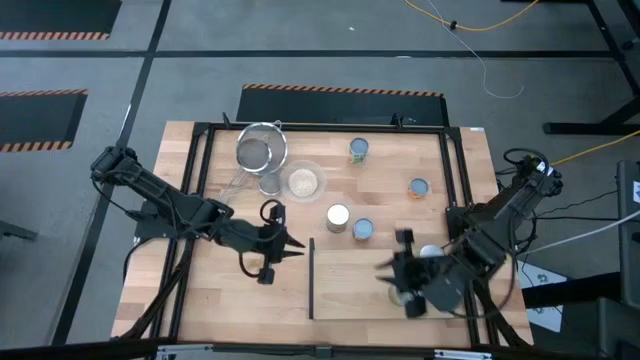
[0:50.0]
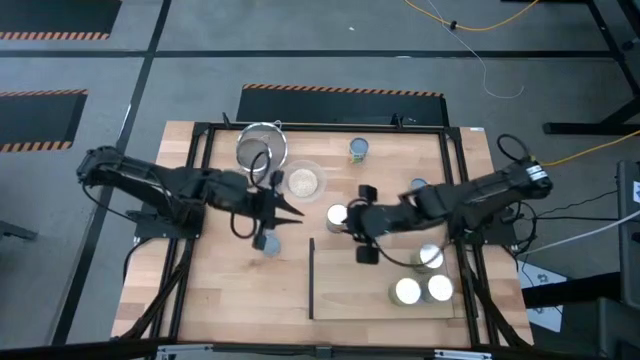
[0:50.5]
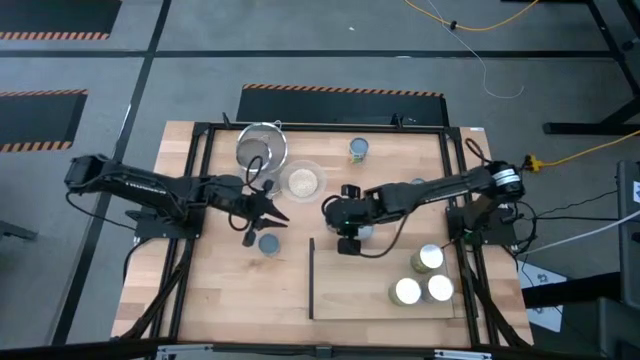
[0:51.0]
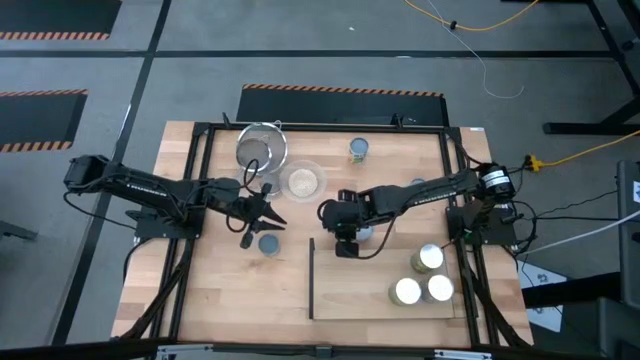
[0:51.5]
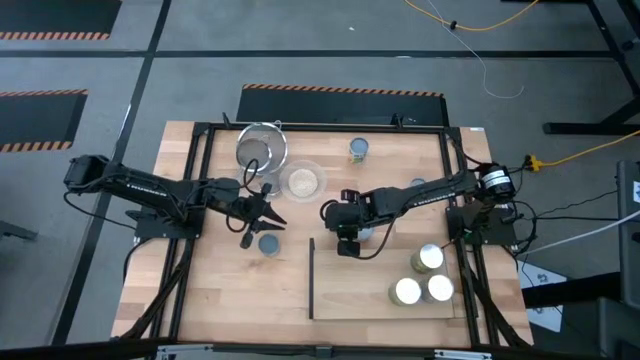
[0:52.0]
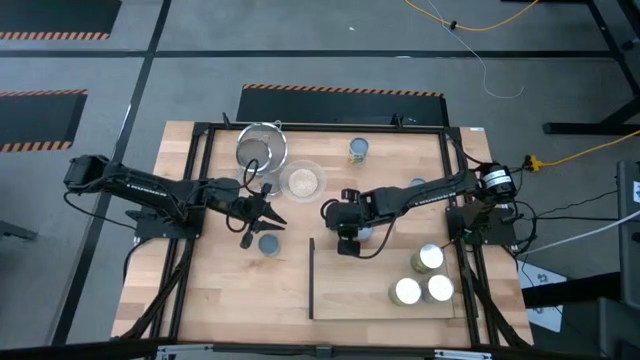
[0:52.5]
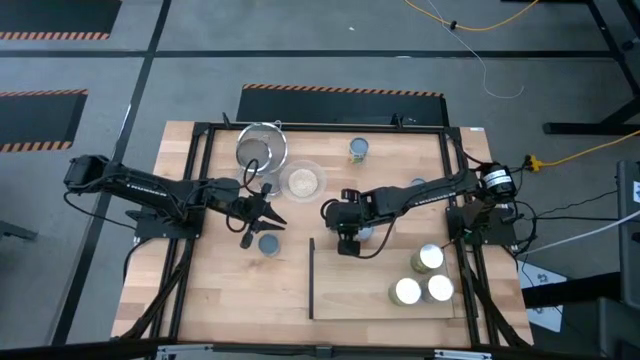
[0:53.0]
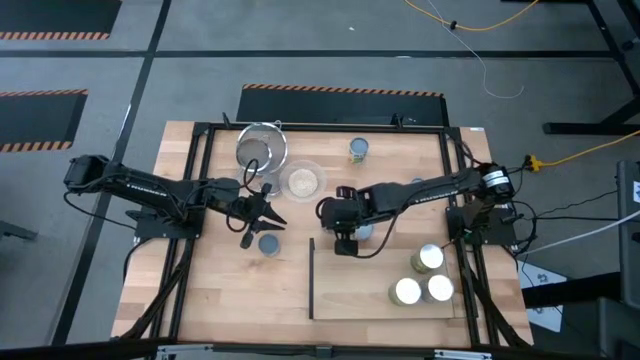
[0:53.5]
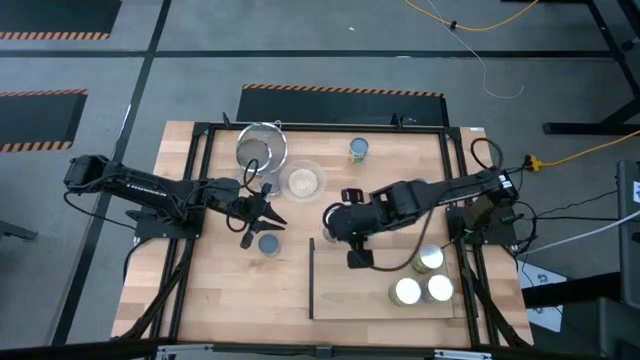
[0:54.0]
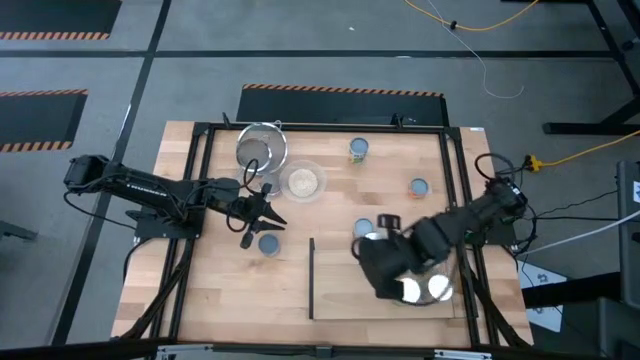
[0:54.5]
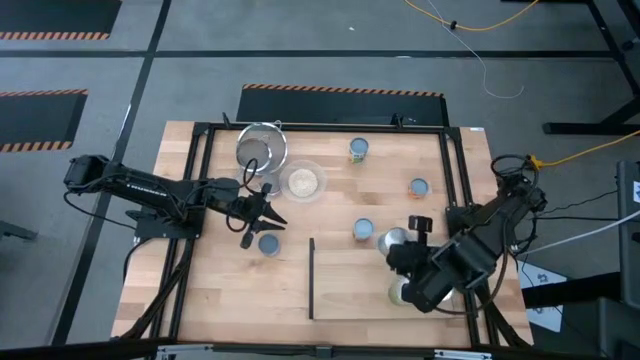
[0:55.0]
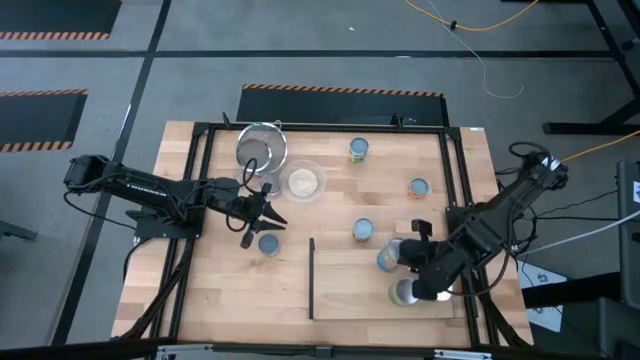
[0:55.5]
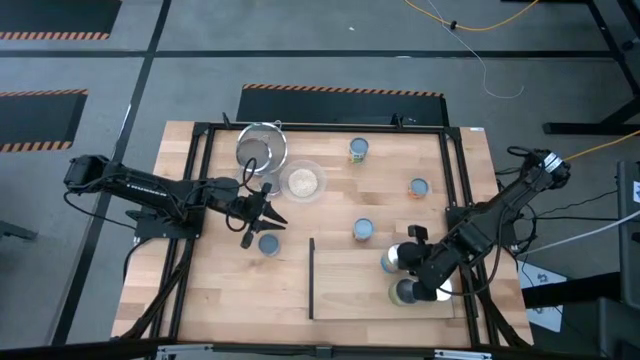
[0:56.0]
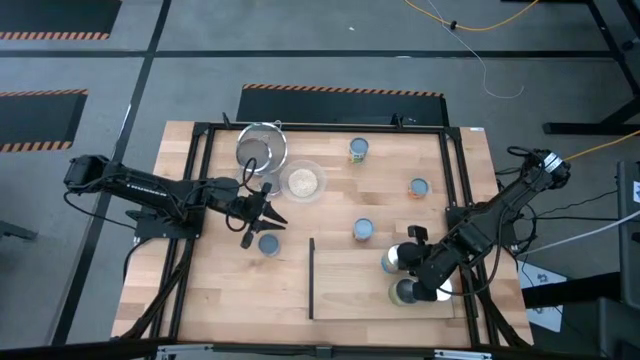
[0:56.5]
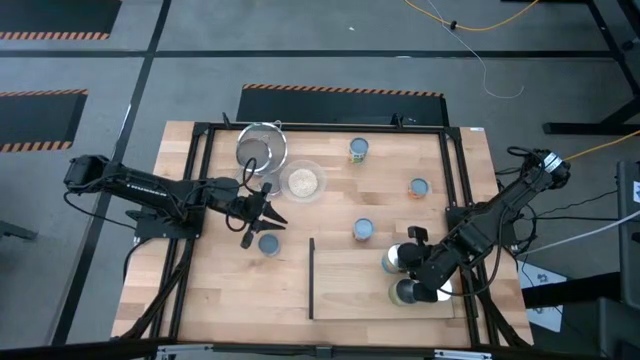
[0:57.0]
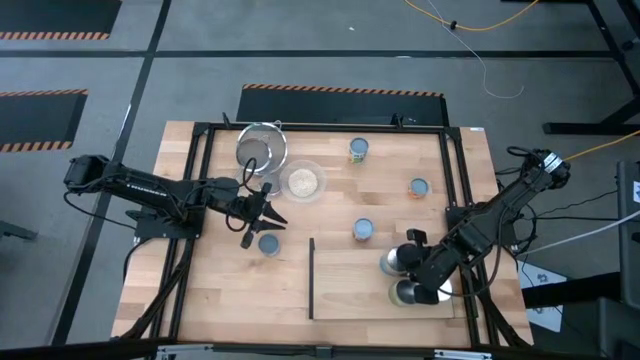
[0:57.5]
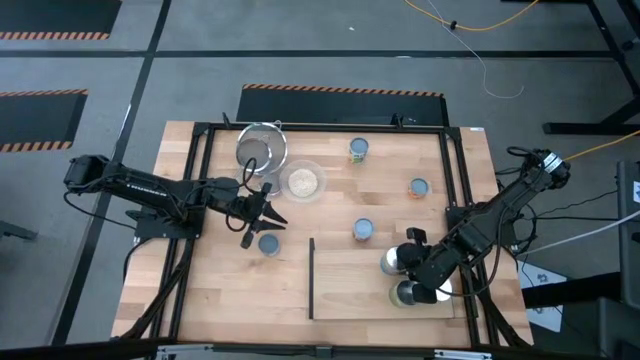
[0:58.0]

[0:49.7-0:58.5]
Task: Pick and place cans onto a shelf
Put the light blue on the shelf aligned with the other light green can

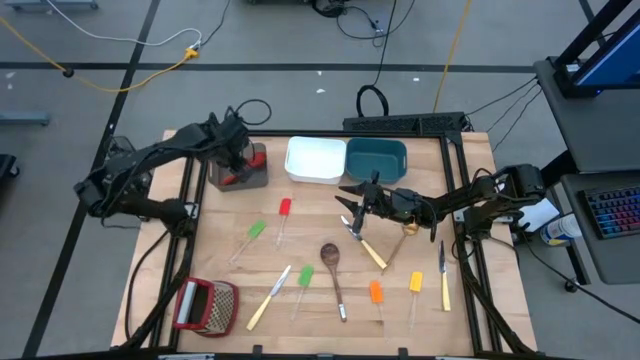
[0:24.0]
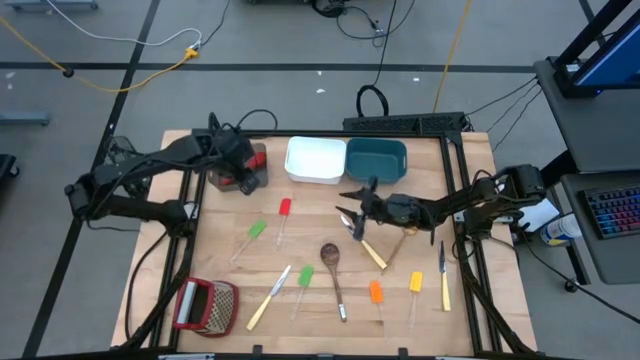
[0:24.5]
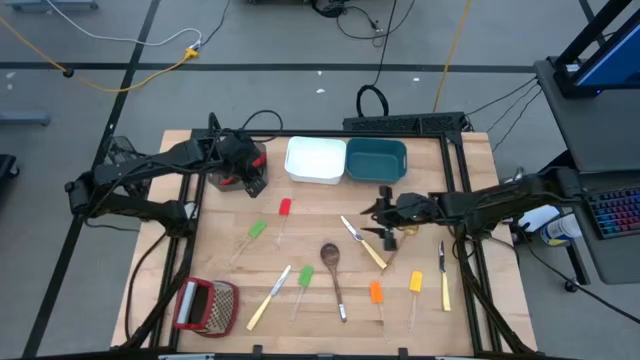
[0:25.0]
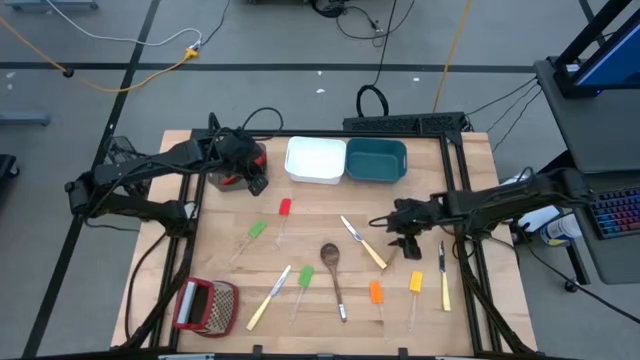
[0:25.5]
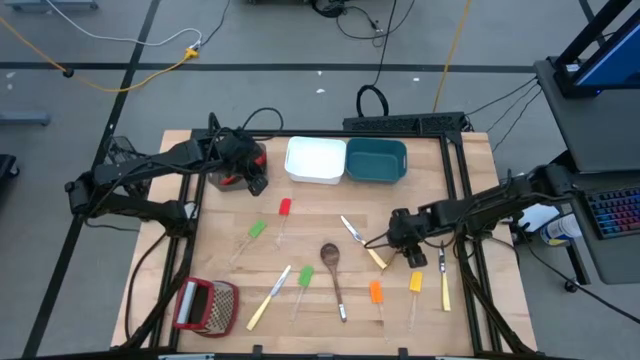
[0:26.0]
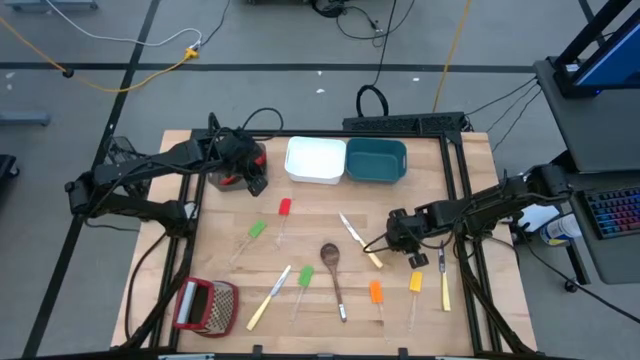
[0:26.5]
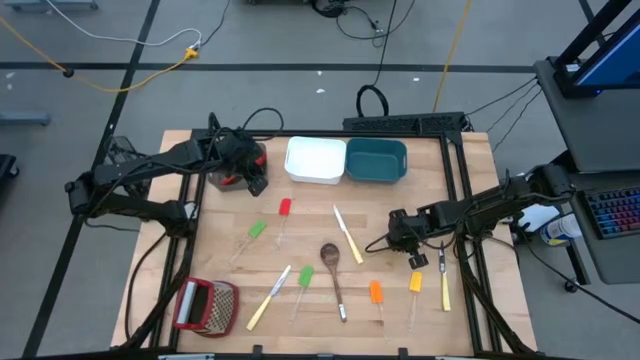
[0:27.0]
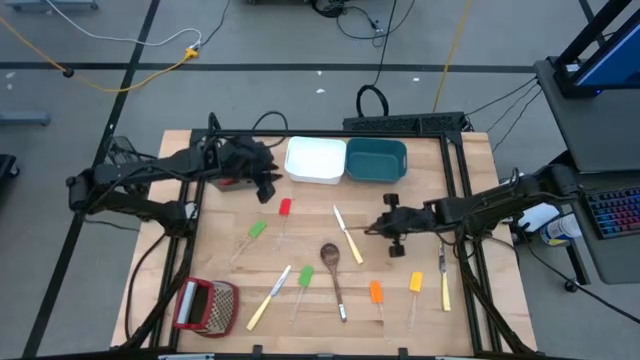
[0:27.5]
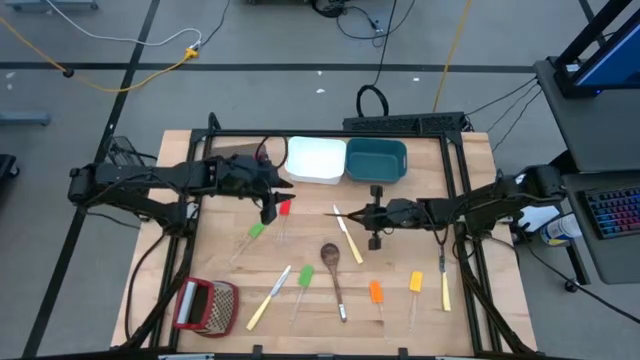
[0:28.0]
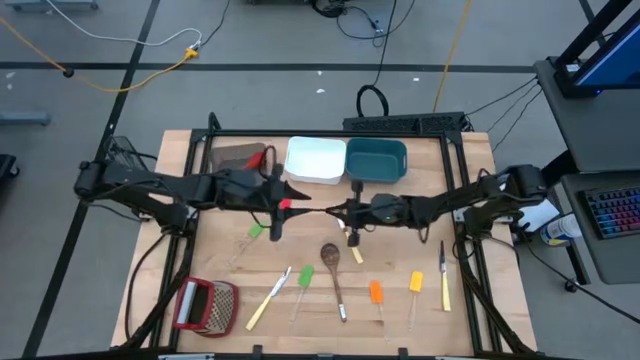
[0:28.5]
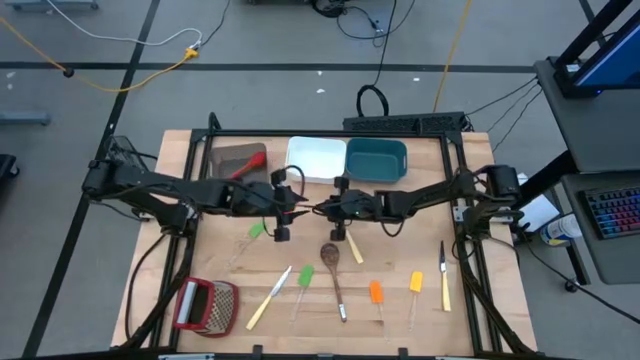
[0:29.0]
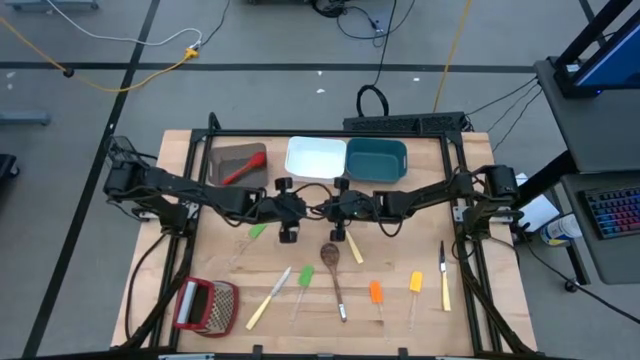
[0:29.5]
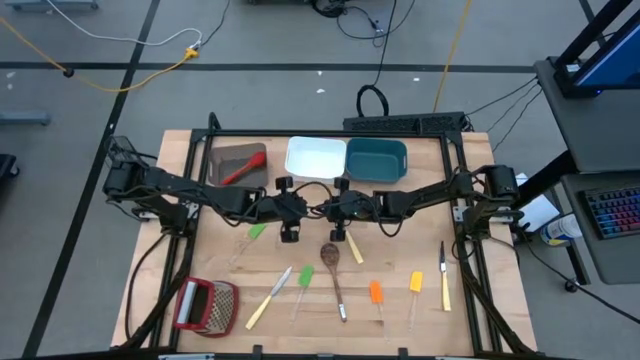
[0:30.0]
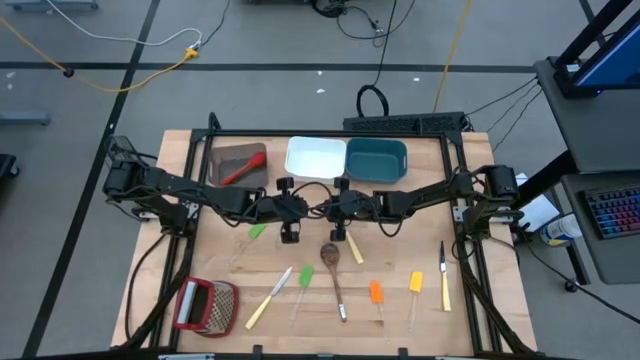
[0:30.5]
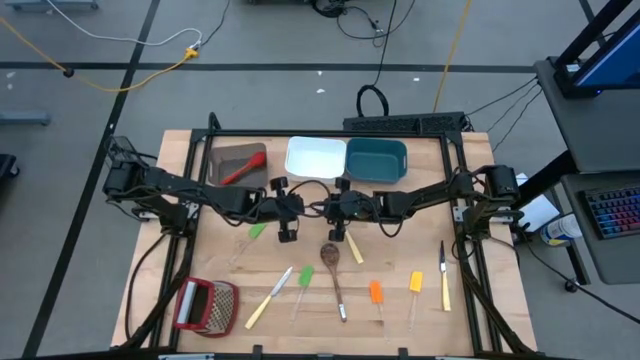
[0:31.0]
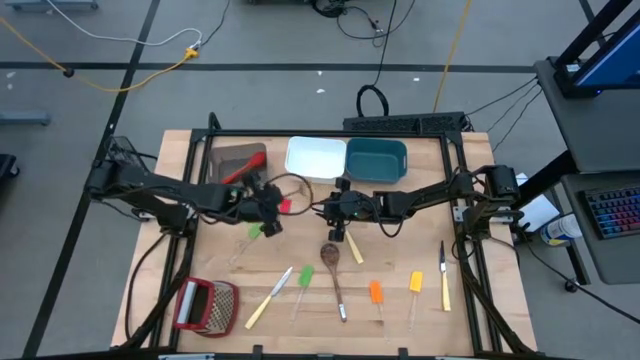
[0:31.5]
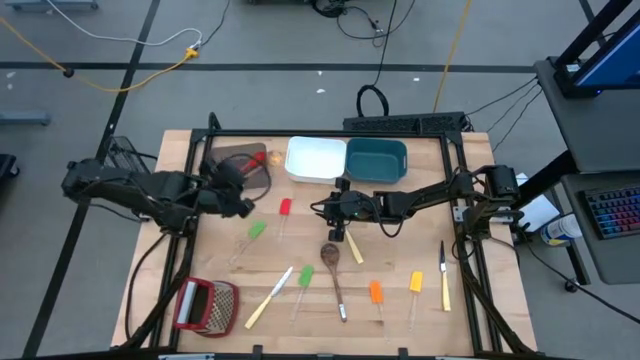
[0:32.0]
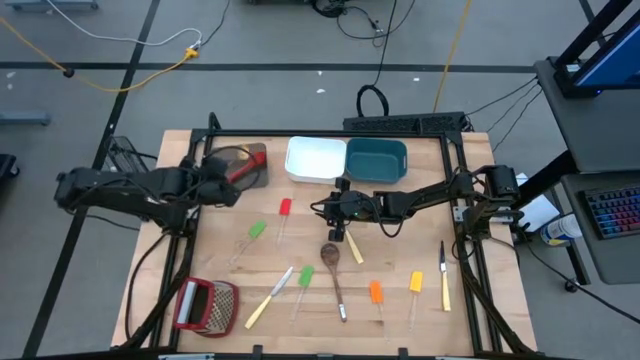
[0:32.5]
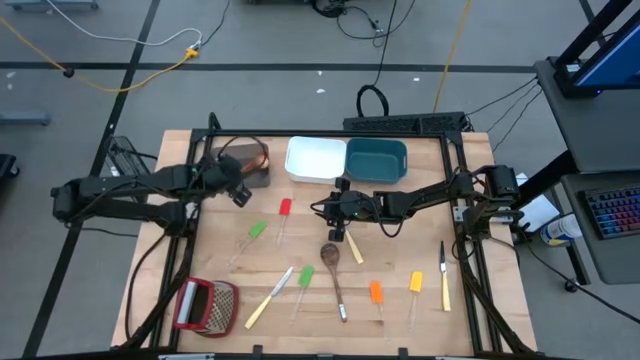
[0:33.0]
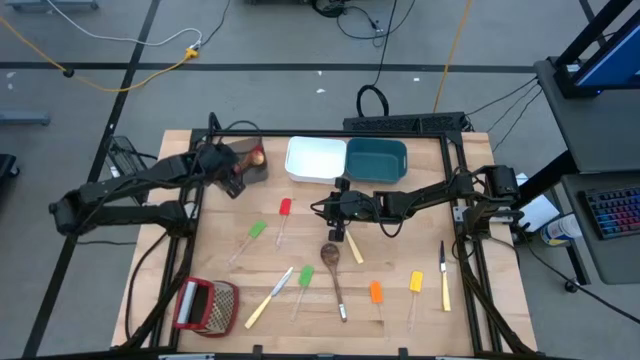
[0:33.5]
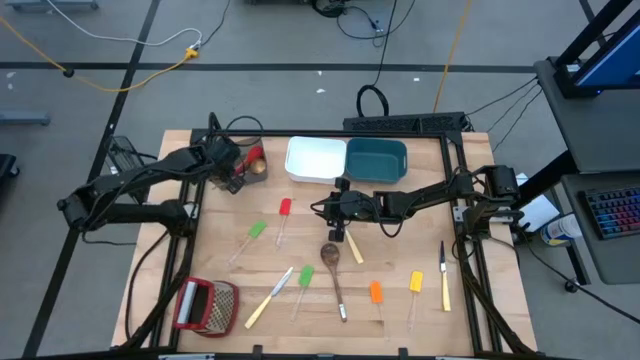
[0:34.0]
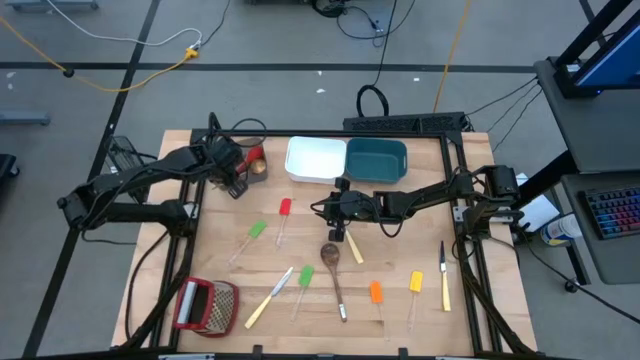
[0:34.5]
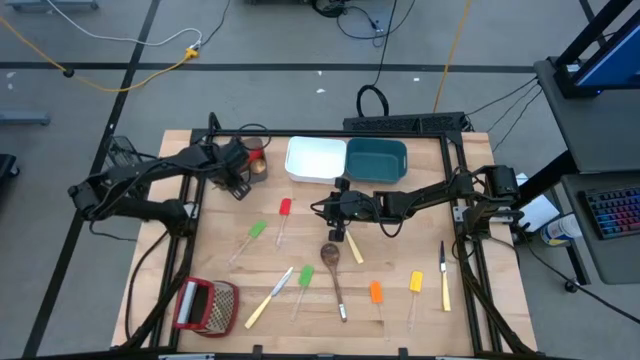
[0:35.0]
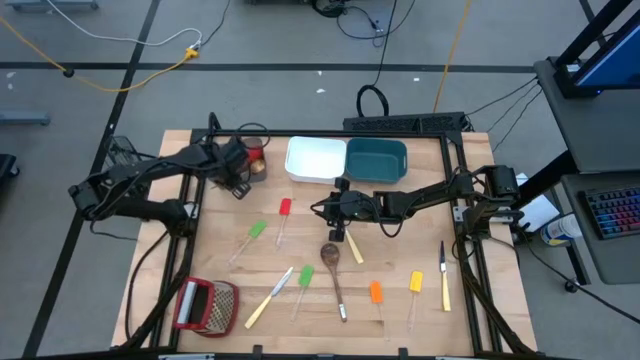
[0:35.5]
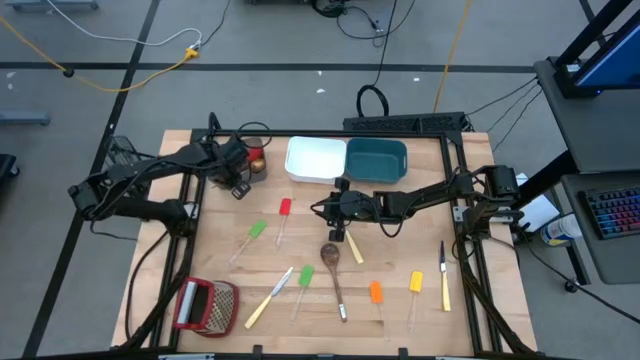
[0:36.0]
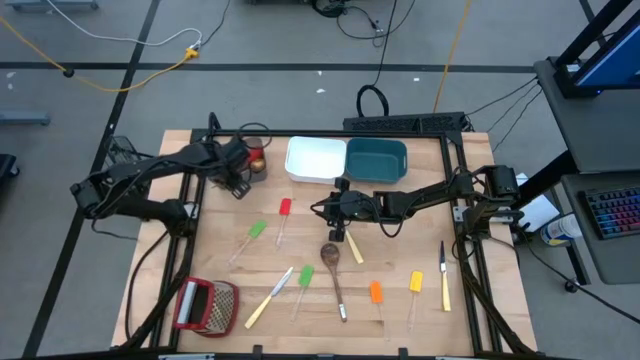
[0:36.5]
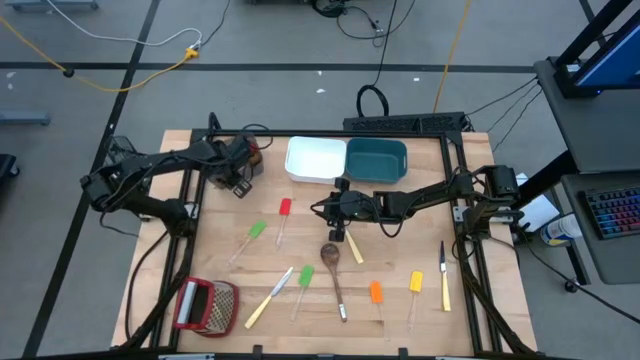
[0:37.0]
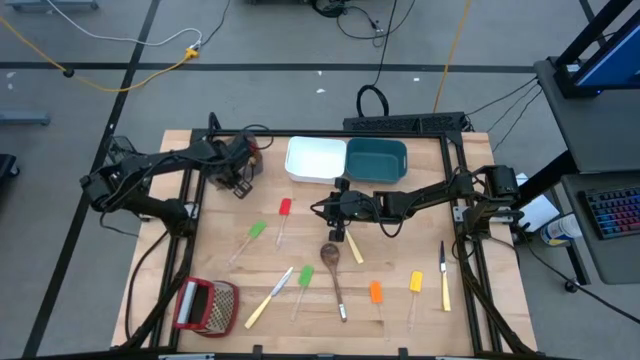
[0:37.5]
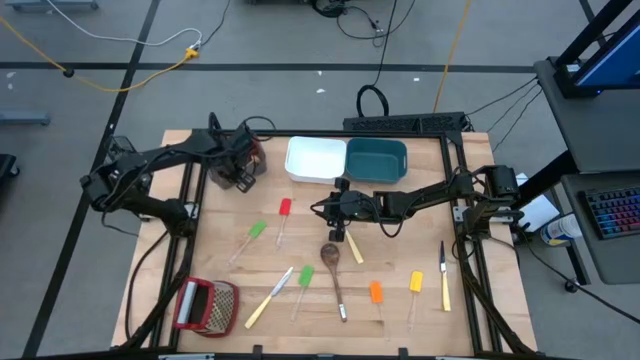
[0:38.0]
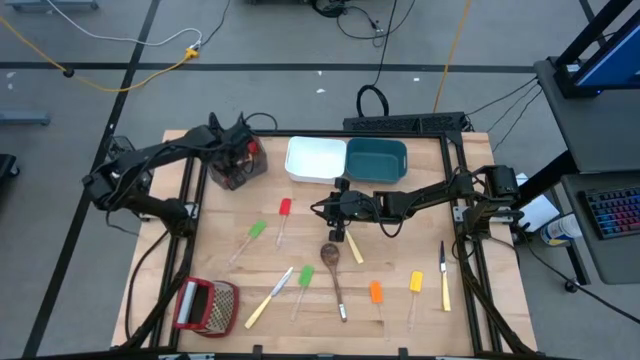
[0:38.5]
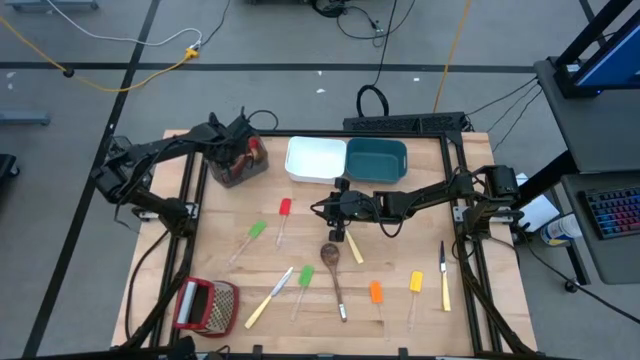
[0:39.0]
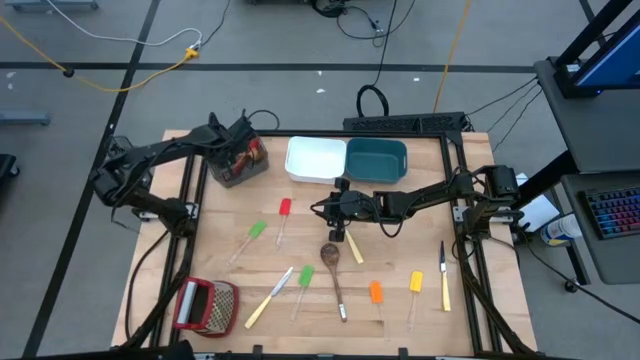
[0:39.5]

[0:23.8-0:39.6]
Task: Pick & Place Kitchen Items
Put the gold serving spoon into the black bin
